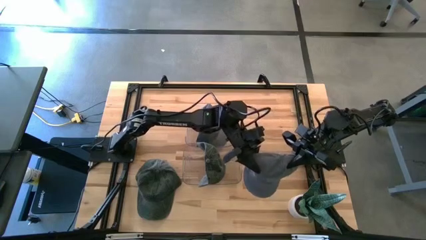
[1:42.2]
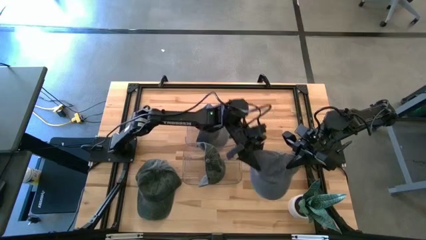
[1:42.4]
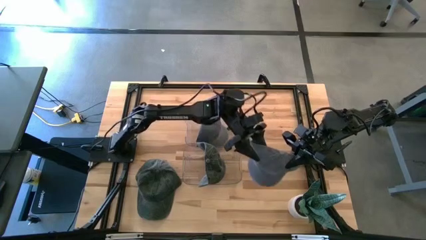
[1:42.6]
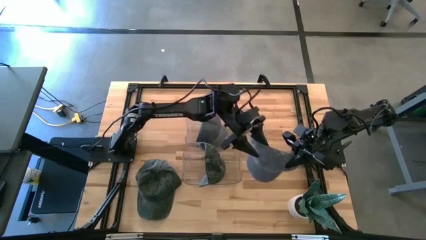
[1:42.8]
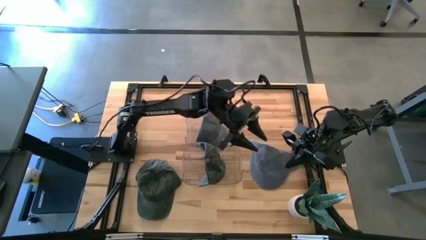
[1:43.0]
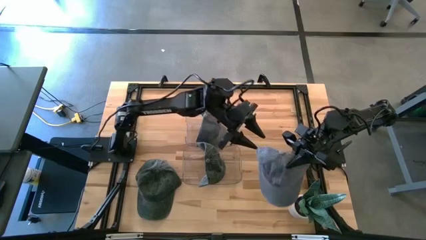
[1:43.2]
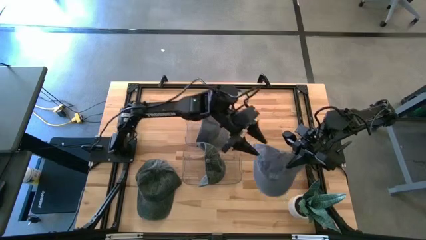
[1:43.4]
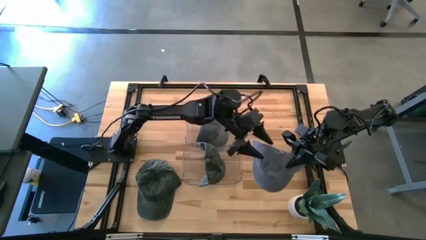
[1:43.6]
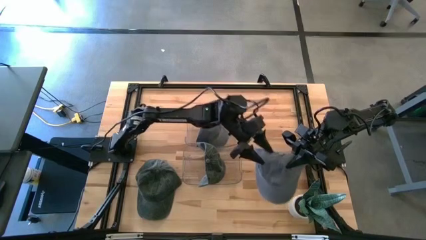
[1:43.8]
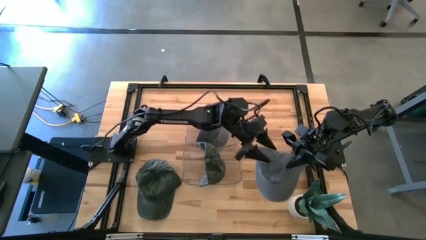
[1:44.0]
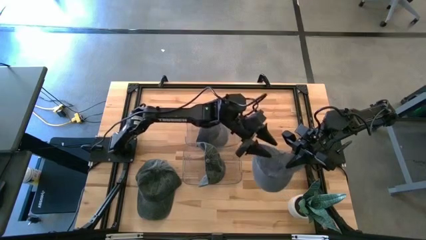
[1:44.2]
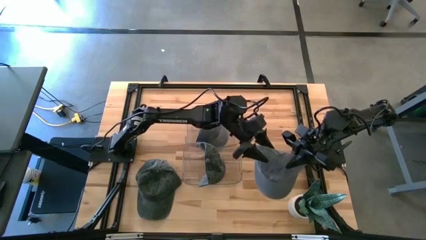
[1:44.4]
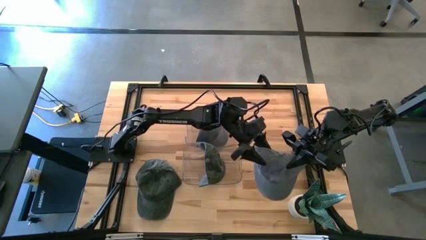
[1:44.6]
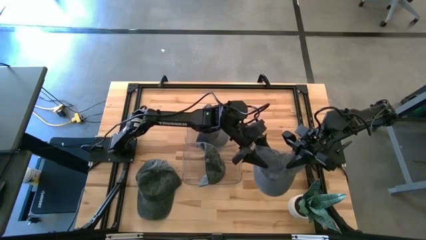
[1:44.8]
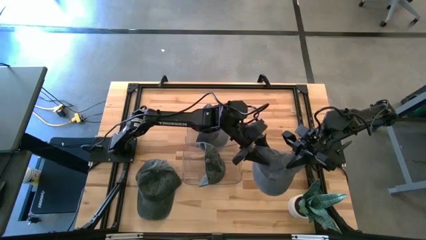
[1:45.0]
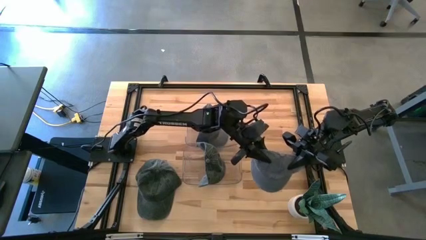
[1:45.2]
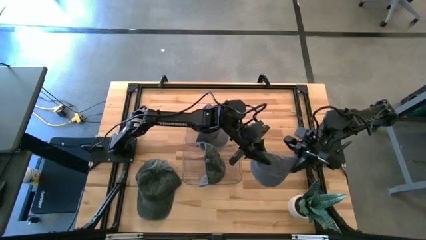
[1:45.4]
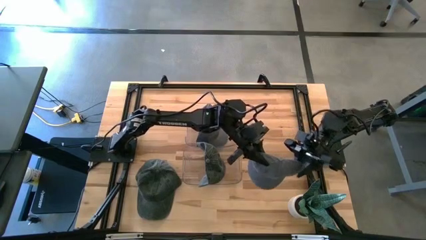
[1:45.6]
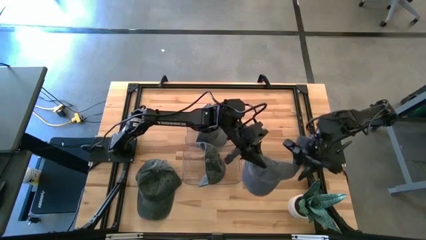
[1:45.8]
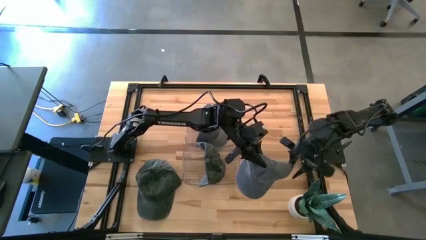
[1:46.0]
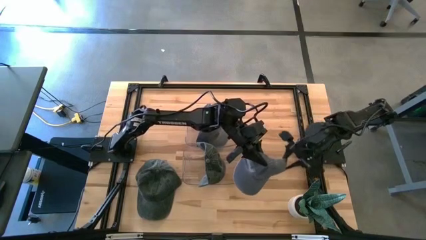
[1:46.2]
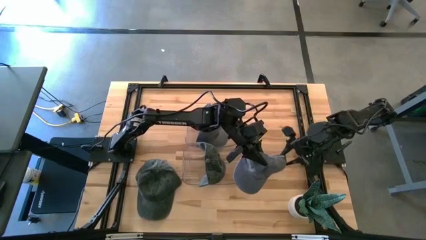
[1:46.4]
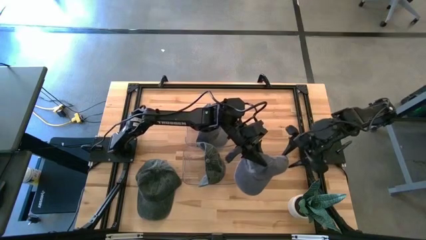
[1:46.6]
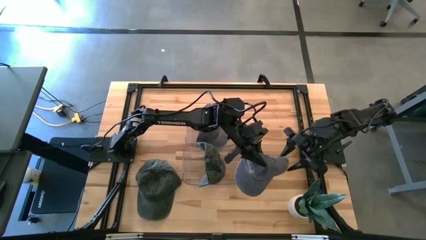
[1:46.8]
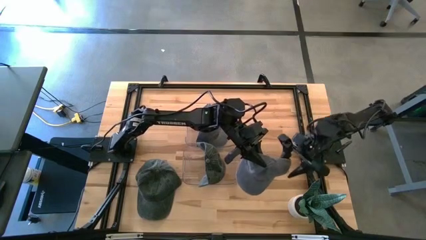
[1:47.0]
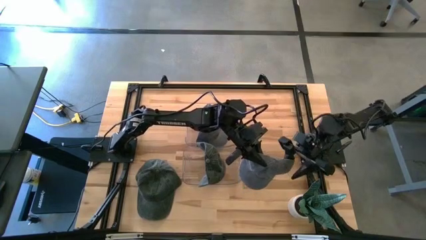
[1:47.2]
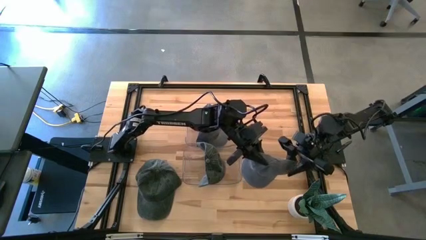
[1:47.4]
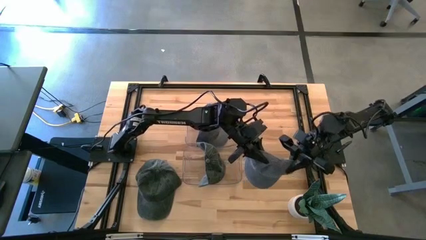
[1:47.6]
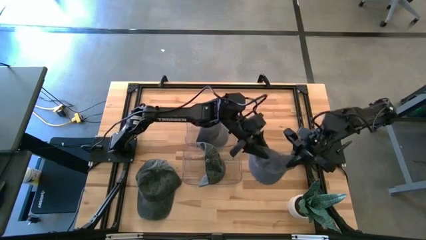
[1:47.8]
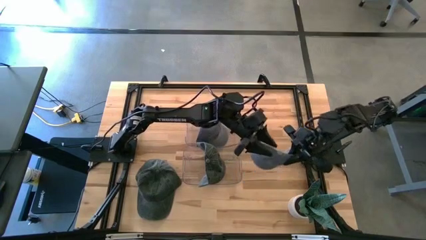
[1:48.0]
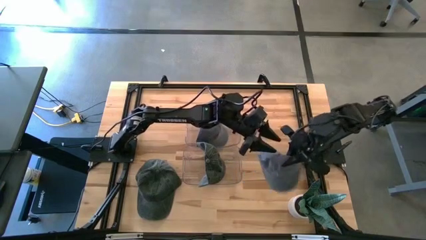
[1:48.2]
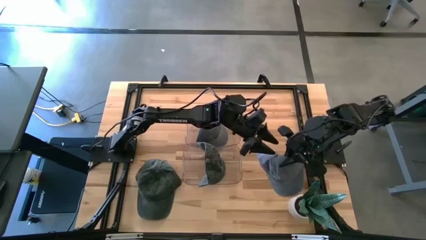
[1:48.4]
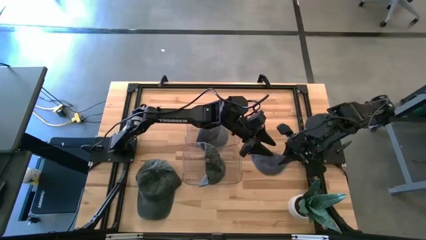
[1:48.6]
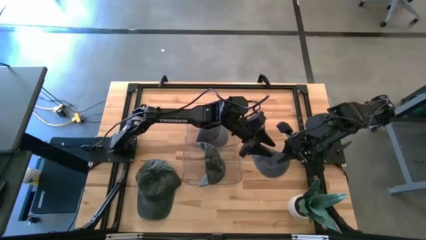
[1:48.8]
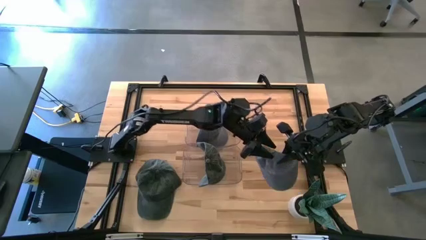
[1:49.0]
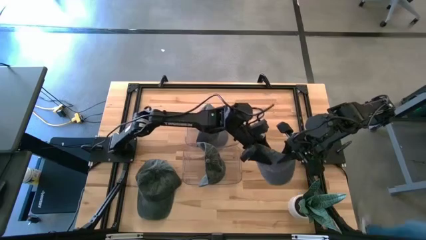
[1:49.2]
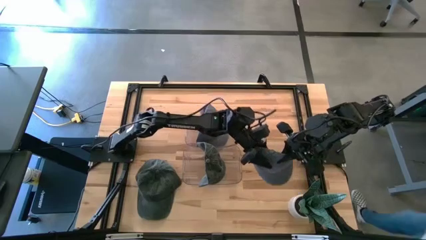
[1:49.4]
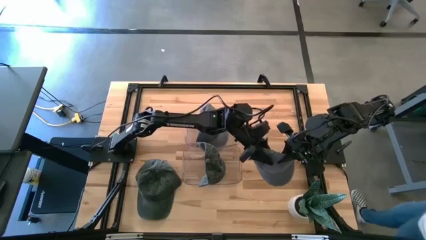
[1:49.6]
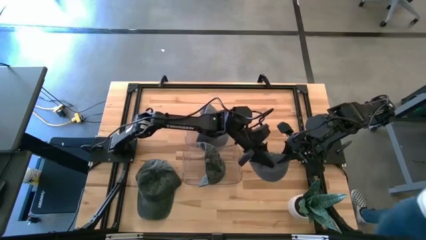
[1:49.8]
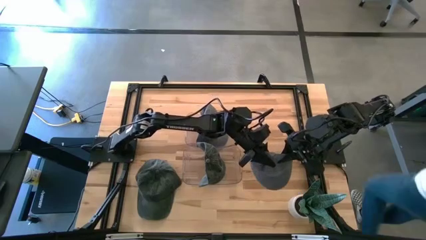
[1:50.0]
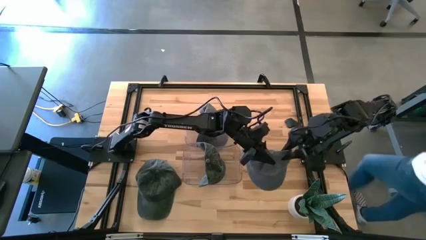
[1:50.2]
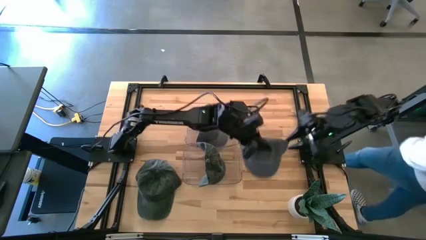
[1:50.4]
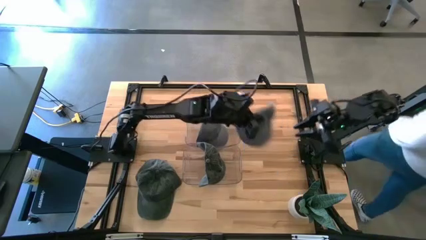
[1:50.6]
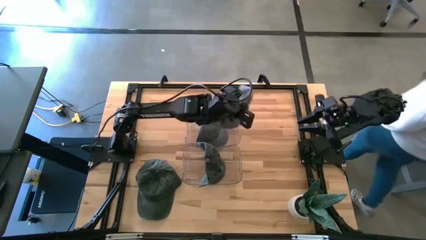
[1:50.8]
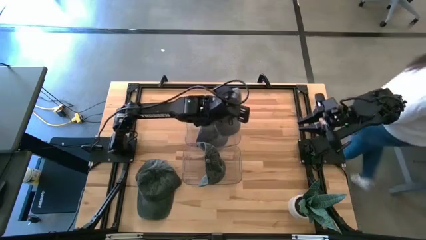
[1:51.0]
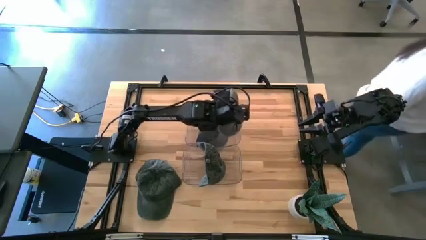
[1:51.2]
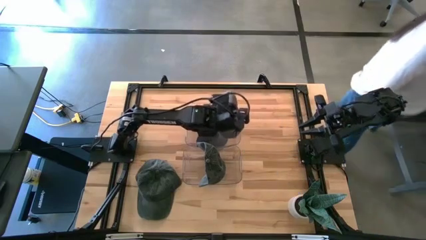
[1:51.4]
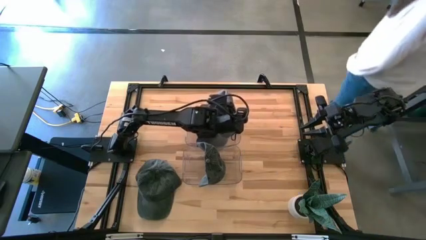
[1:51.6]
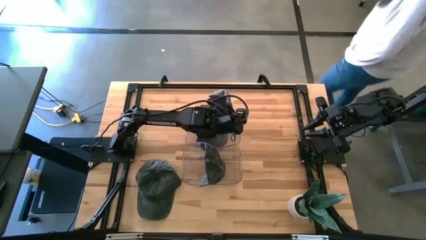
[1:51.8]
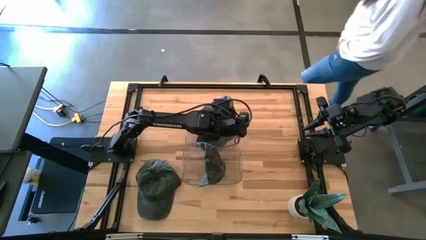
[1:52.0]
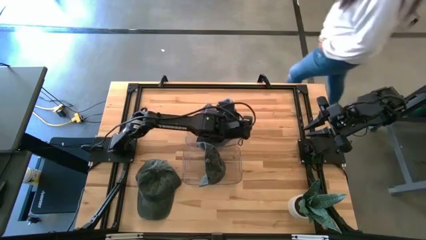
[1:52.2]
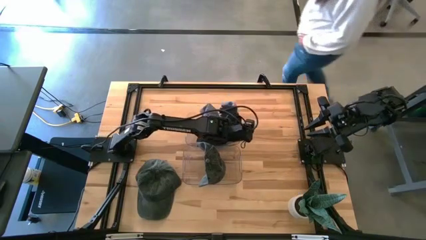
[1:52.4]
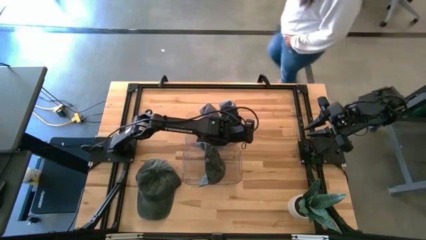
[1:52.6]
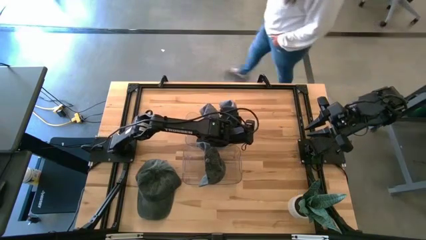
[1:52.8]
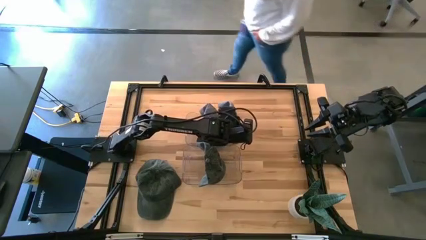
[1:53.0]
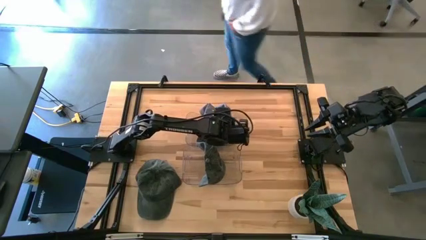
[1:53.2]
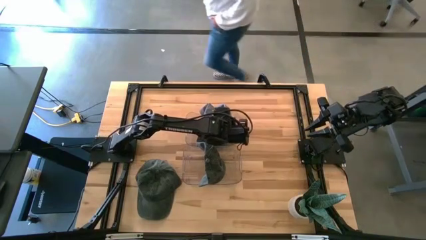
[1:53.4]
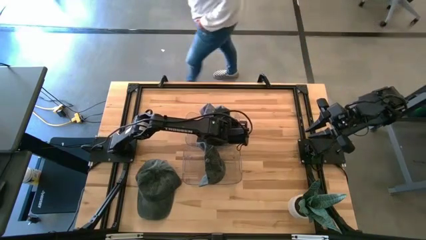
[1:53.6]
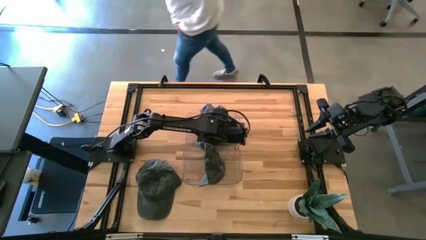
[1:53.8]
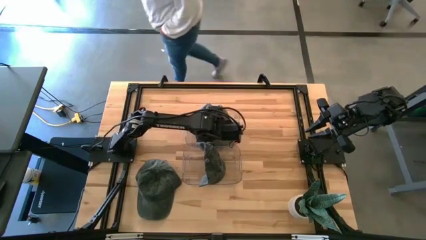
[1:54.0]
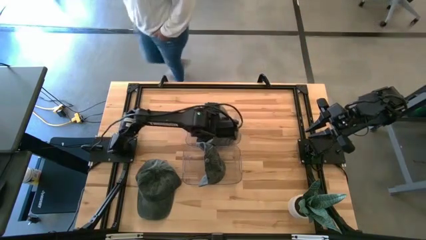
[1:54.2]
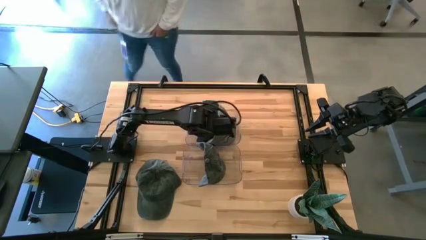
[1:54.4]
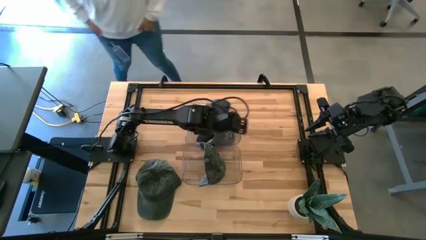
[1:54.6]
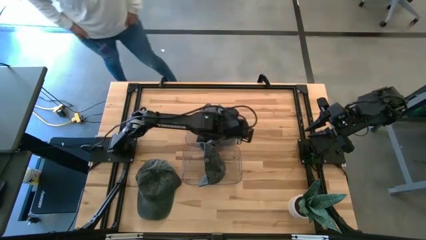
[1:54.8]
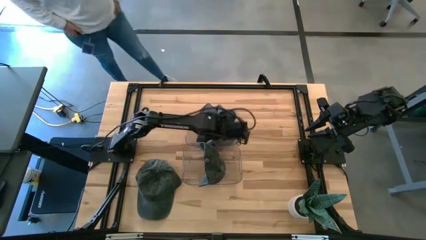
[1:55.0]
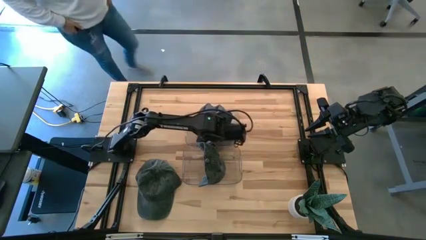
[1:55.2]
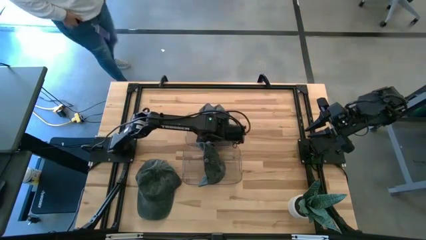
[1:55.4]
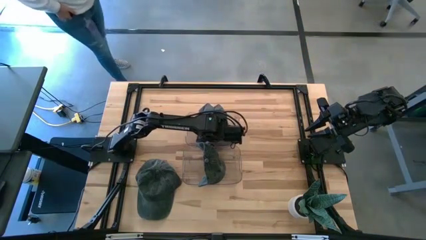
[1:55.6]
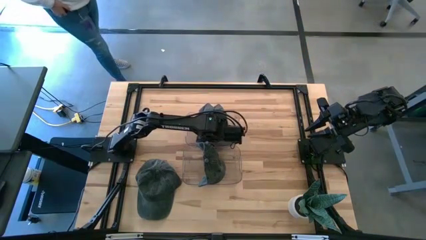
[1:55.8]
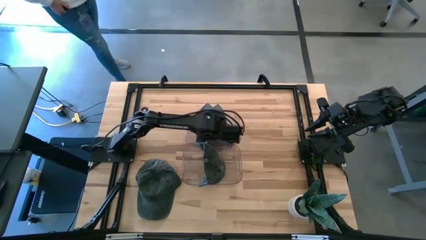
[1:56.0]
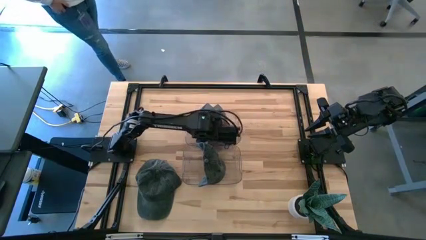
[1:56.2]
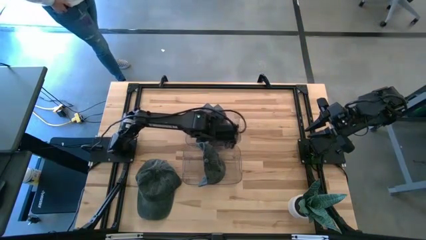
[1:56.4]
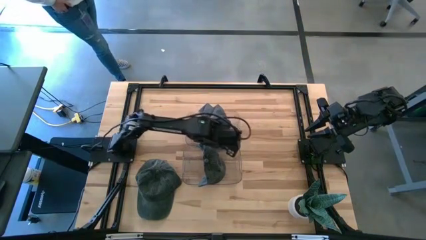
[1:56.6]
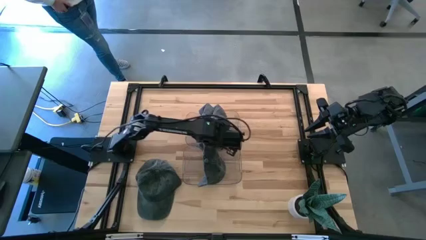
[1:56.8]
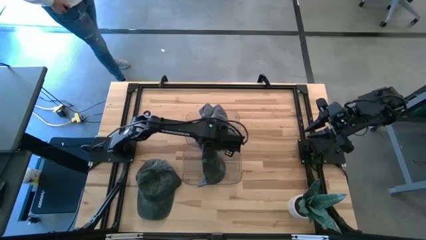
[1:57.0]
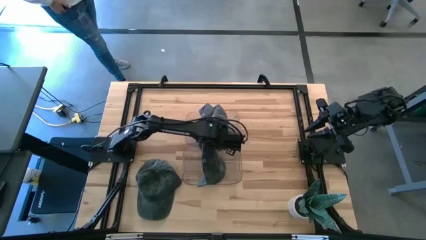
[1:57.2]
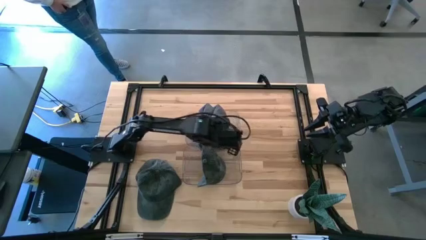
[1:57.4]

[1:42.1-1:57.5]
Task: Pick & Place hat
Put the gray cap into the top transparent bin
